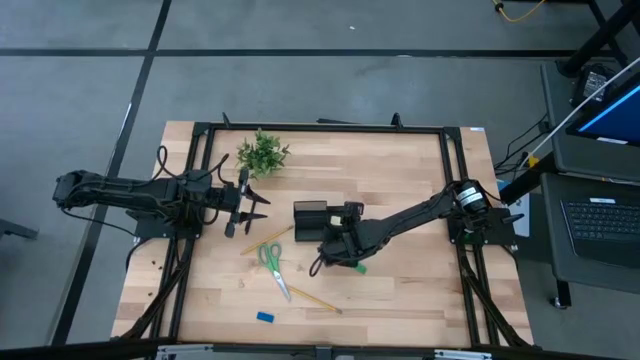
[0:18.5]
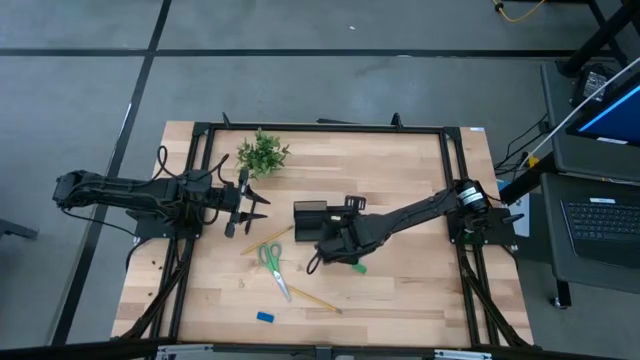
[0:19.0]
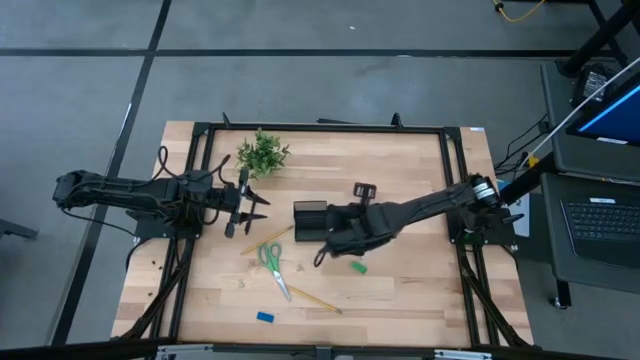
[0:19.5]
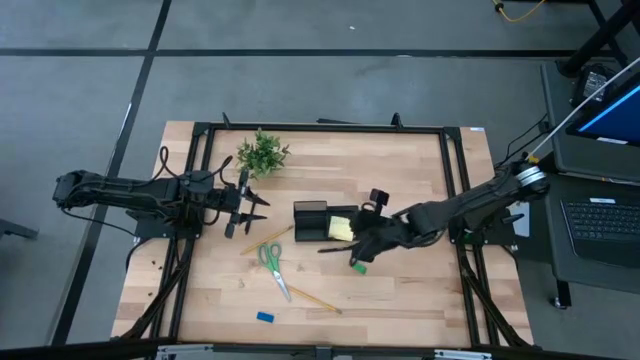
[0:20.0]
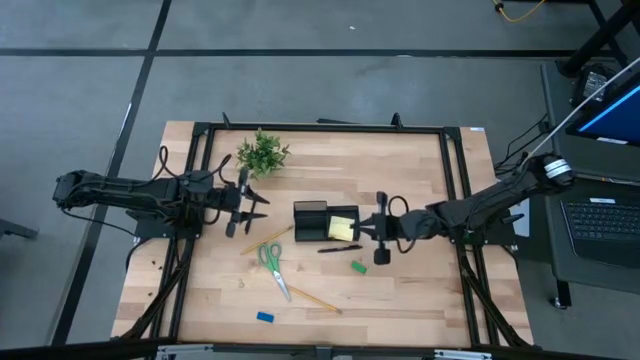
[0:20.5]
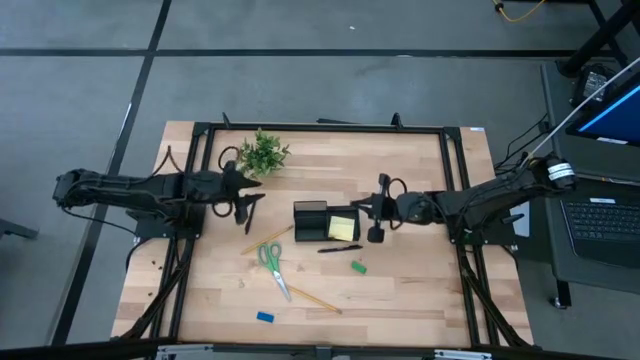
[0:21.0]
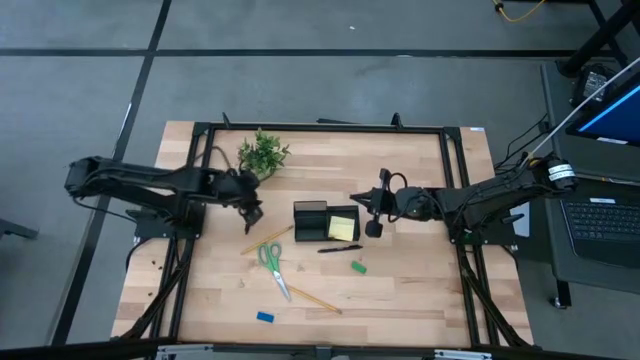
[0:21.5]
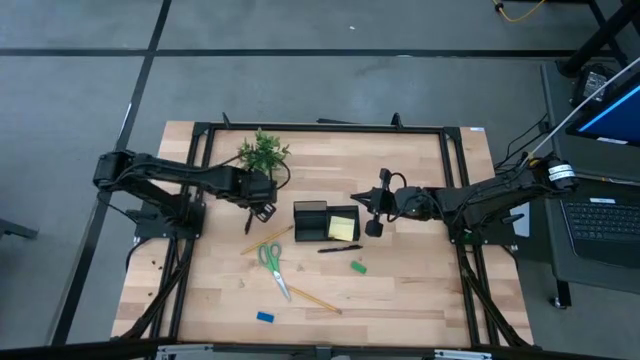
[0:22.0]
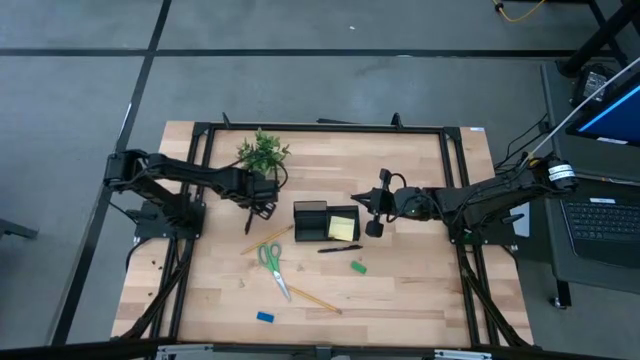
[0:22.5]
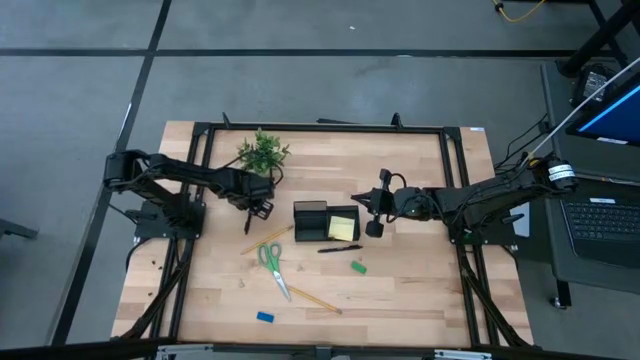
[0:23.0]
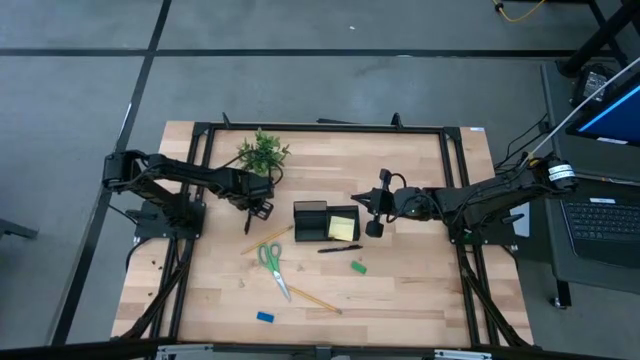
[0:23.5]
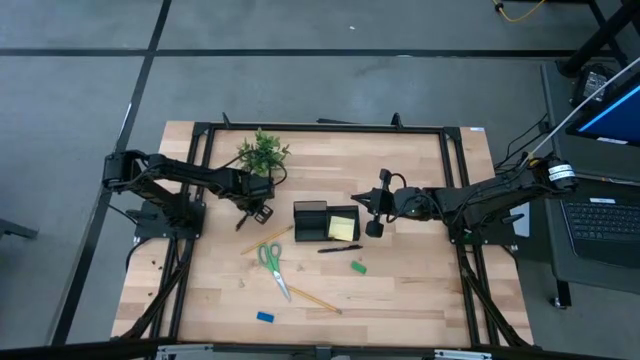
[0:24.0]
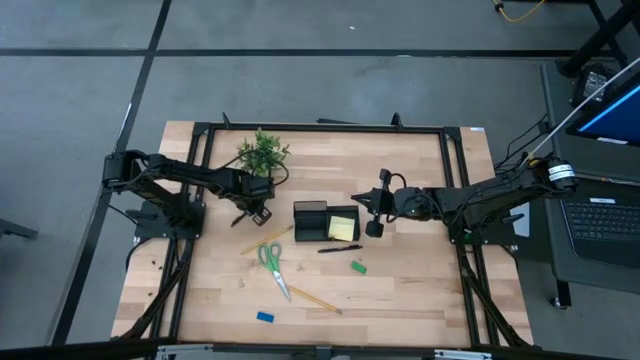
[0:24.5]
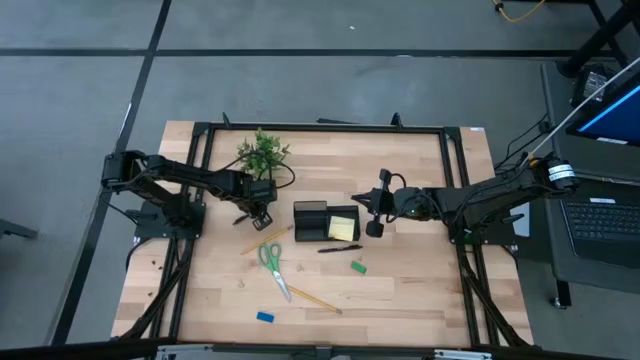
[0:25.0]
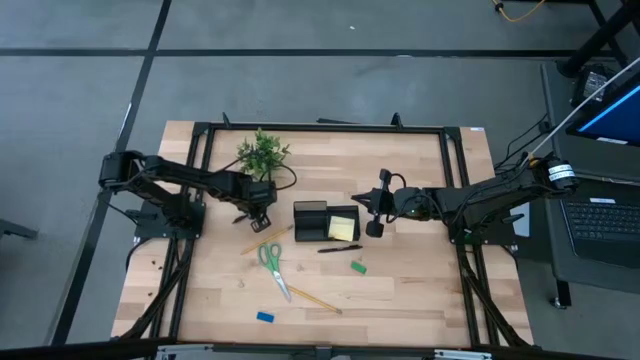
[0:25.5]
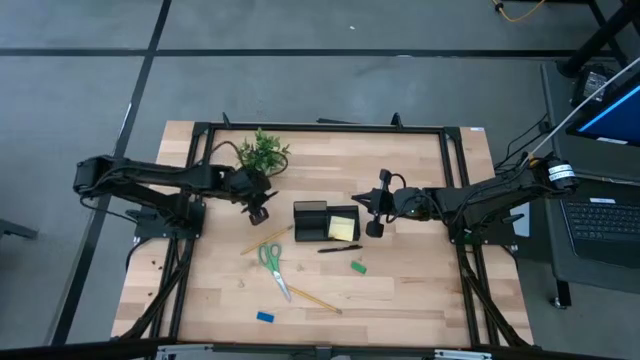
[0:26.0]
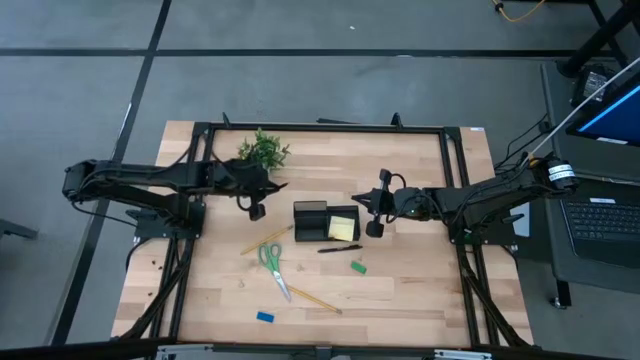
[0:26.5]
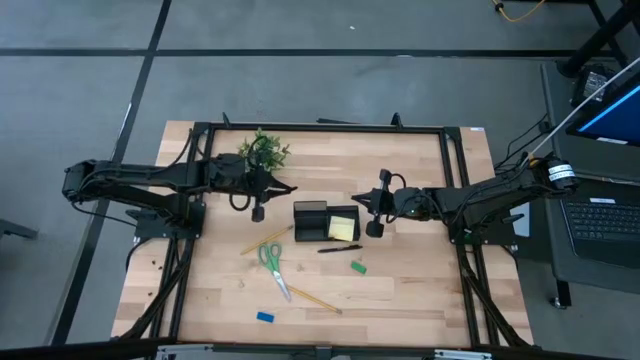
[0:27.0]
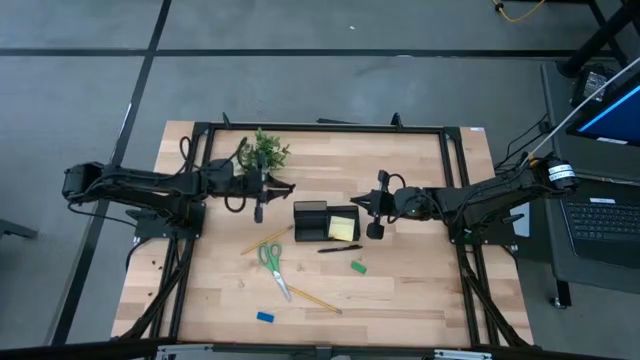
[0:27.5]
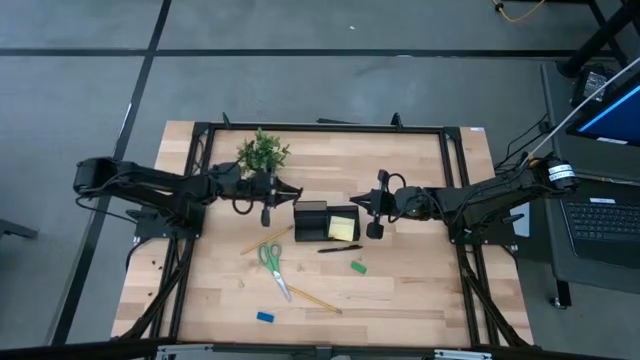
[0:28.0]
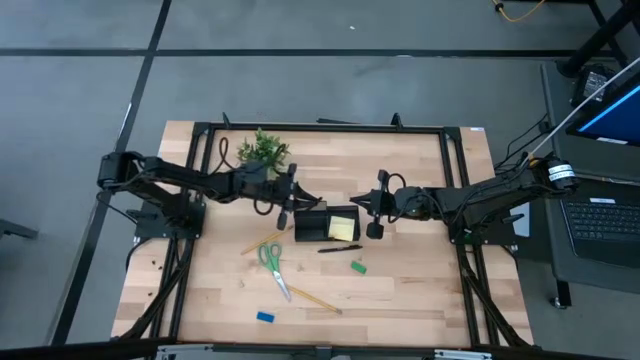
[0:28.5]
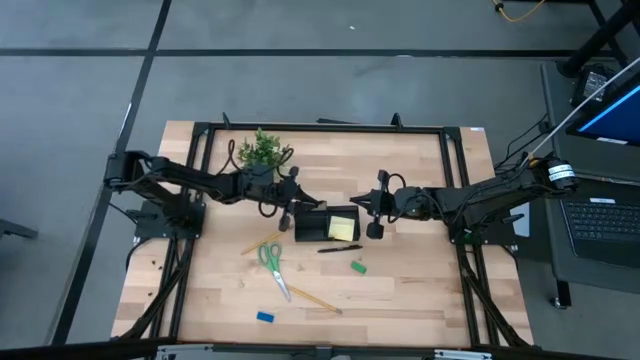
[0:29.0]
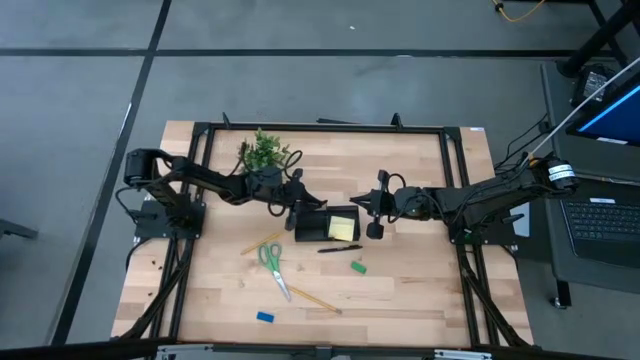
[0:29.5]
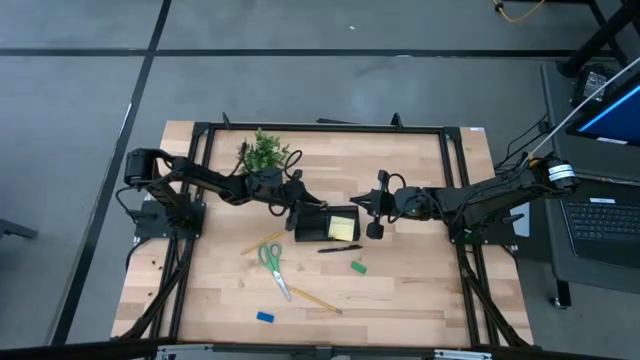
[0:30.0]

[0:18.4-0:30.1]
Task: Pick and place office supplies into organizer
Put the top black pen into the black desk organizer

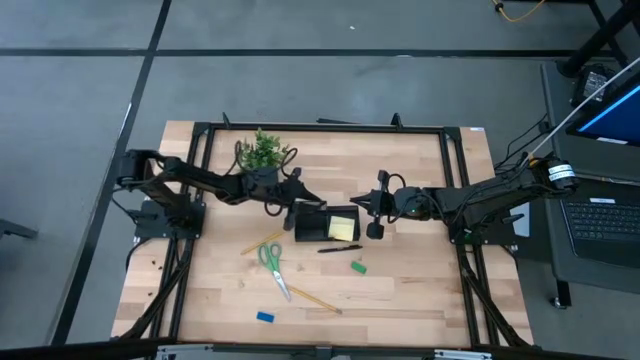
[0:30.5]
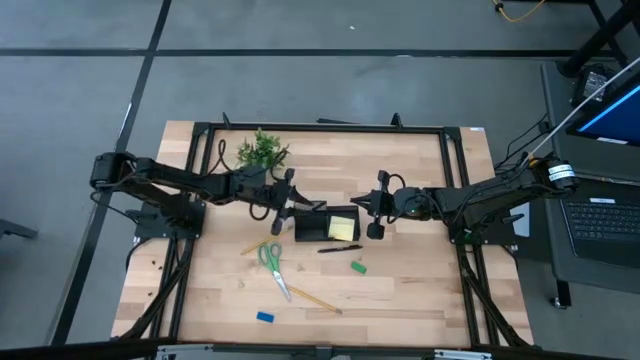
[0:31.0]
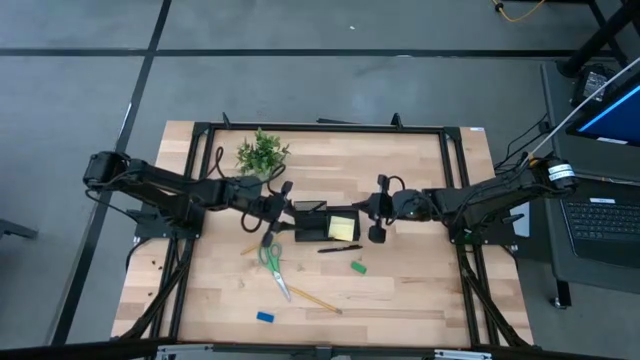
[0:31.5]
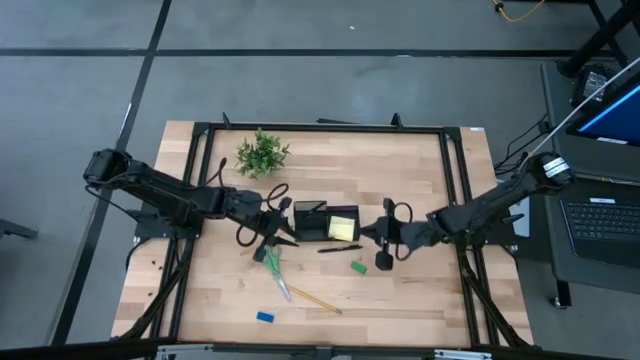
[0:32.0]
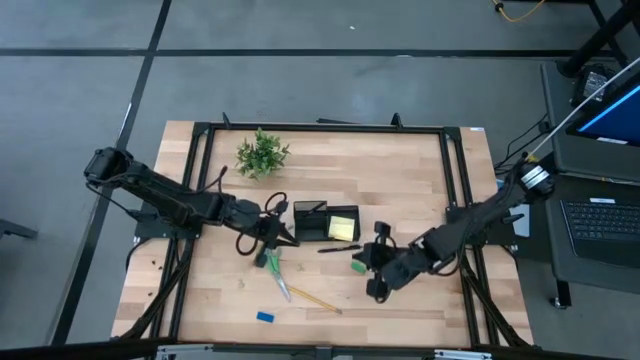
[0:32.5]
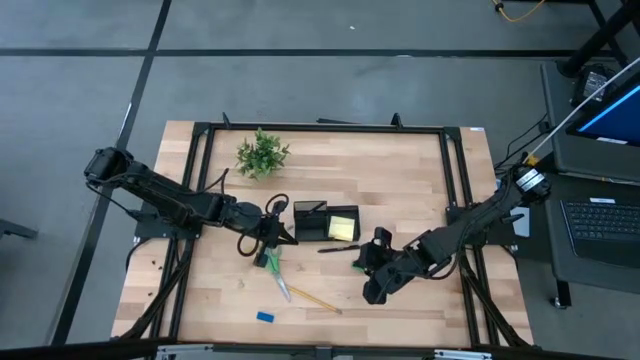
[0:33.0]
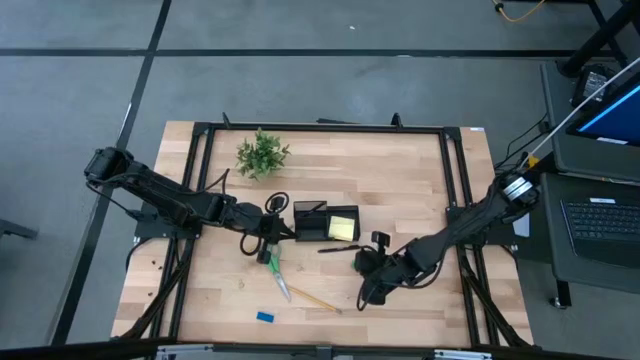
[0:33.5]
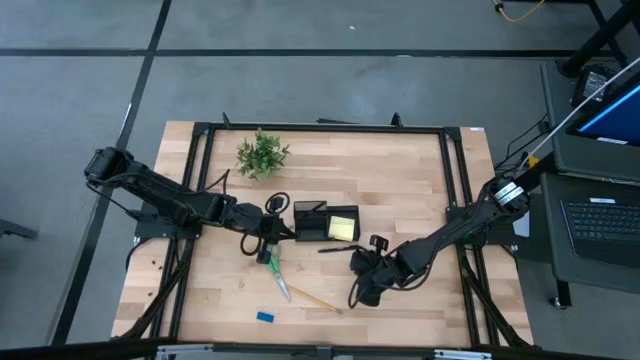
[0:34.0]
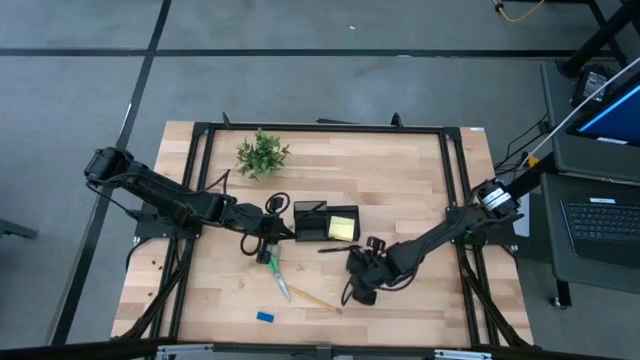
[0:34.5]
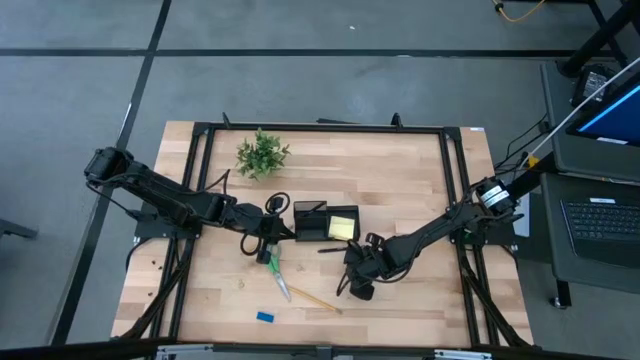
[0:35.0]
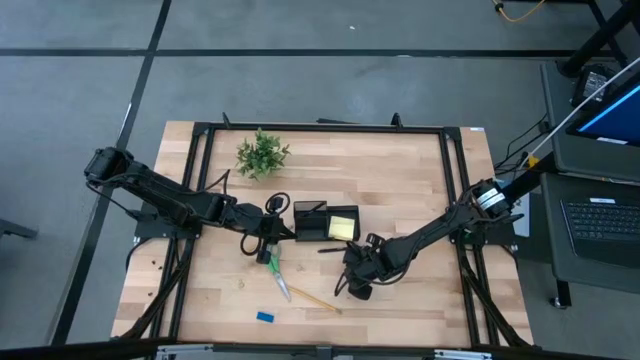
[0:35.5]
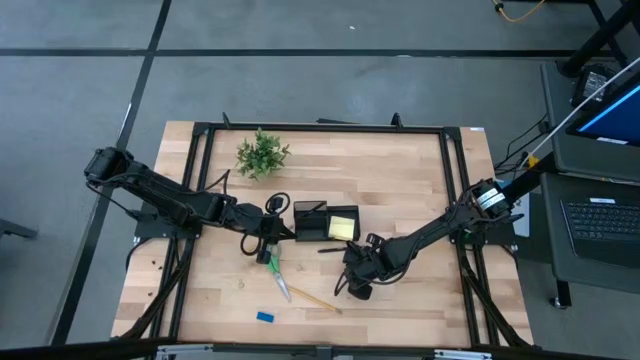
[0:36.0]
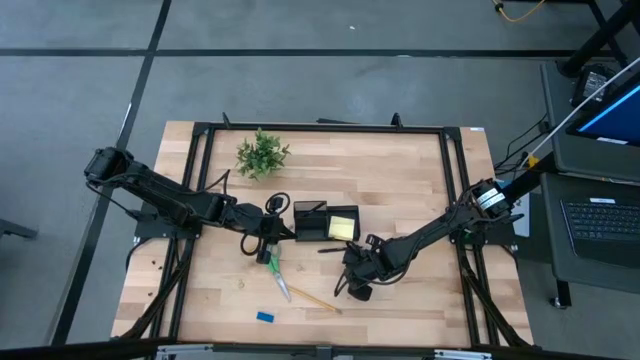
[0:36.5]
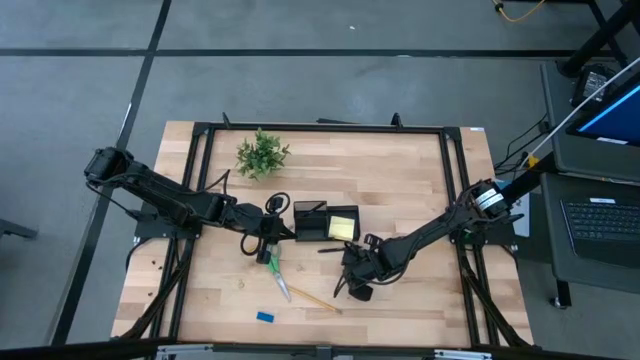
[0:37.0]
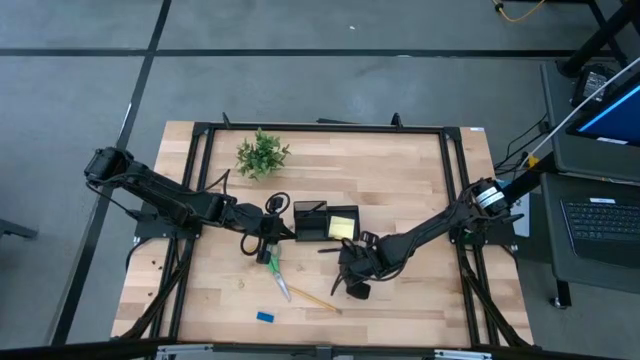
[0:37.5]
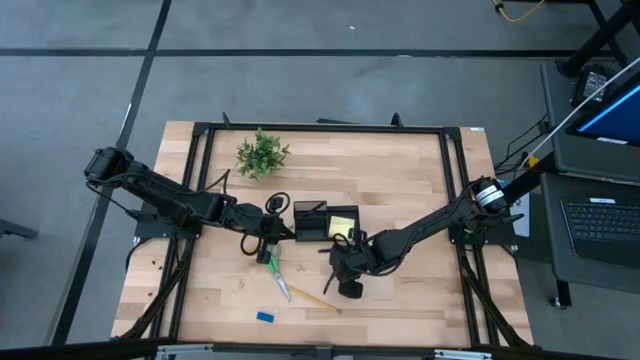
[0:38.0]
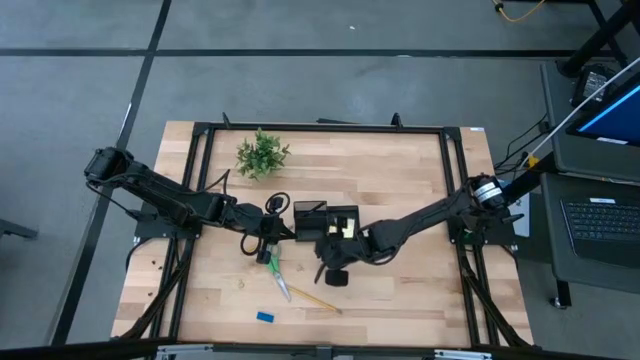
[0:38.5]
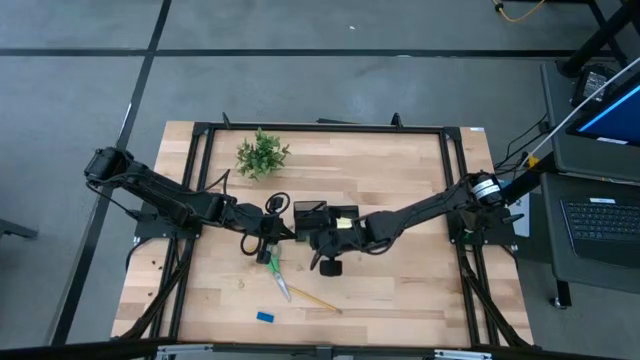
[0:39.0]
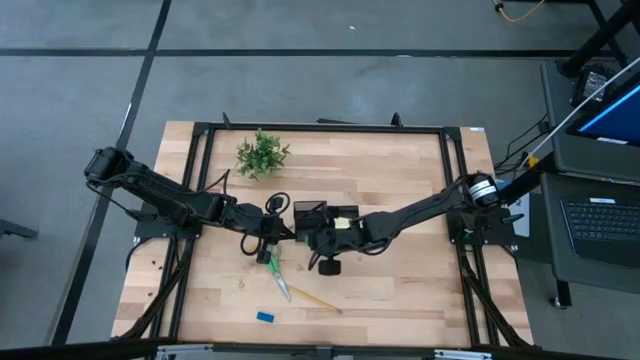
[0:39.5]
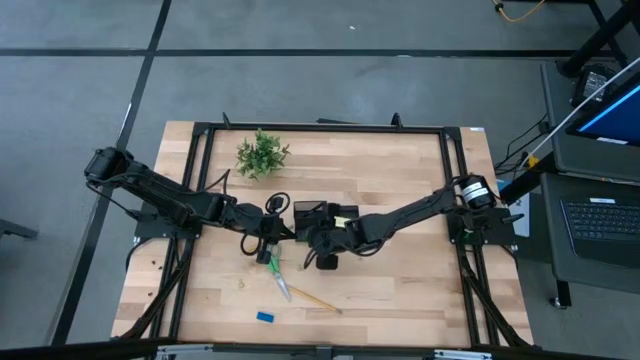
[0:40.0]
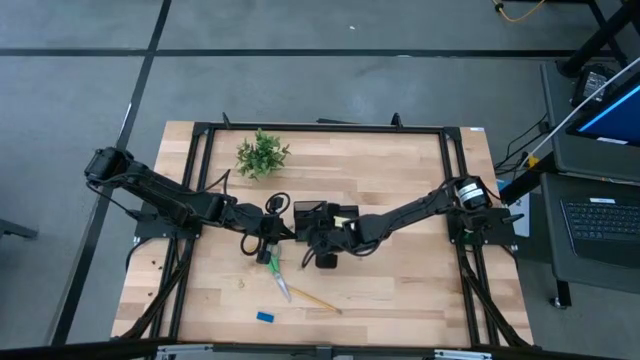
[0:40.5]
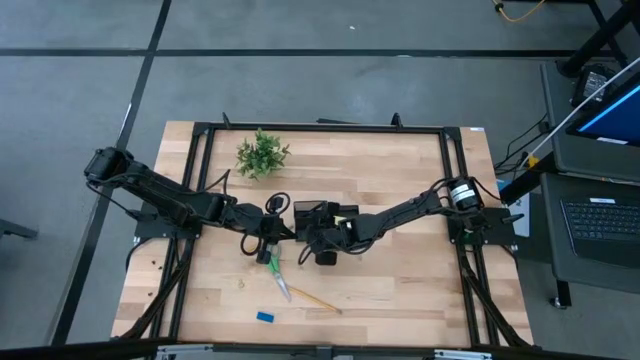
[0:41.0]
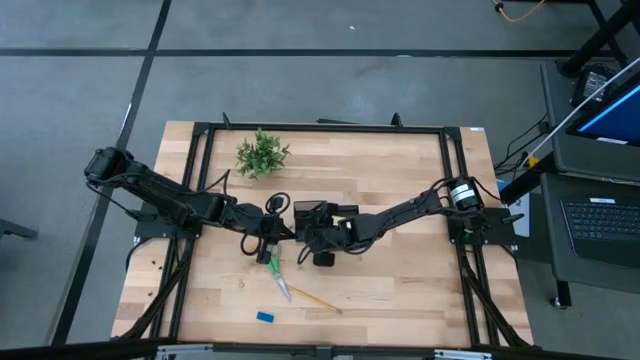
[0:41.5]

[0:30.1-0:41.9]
Put the green eraser into the black desk organizer
